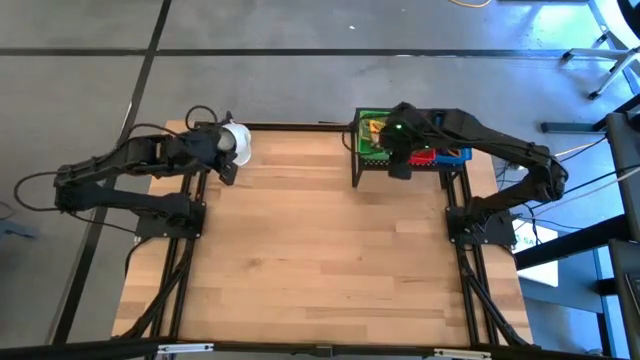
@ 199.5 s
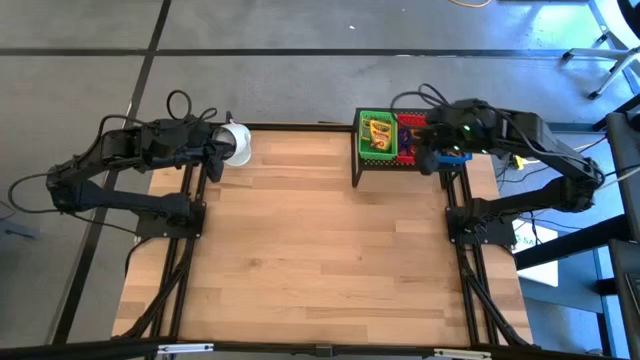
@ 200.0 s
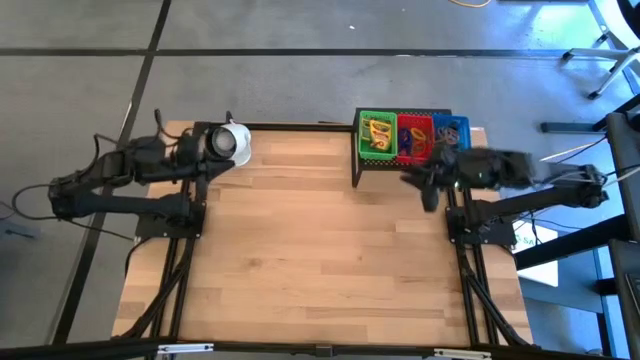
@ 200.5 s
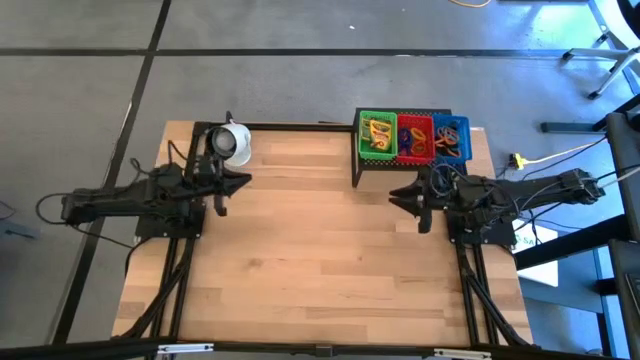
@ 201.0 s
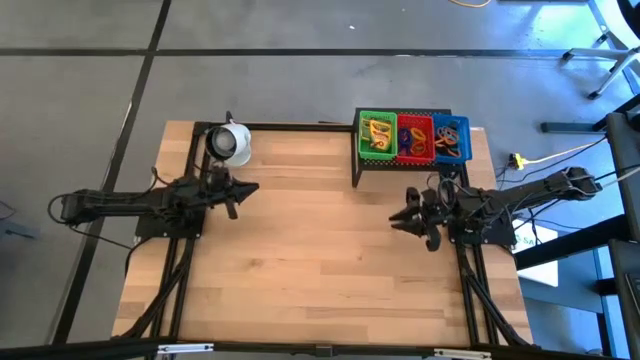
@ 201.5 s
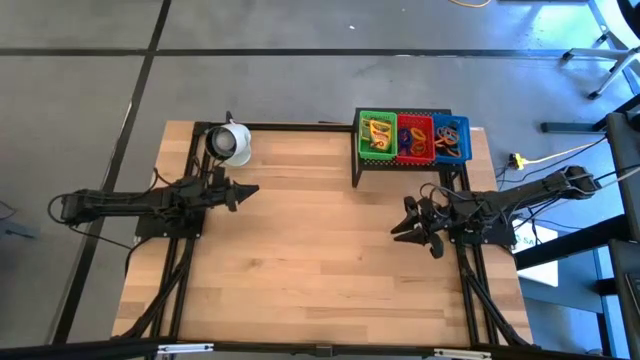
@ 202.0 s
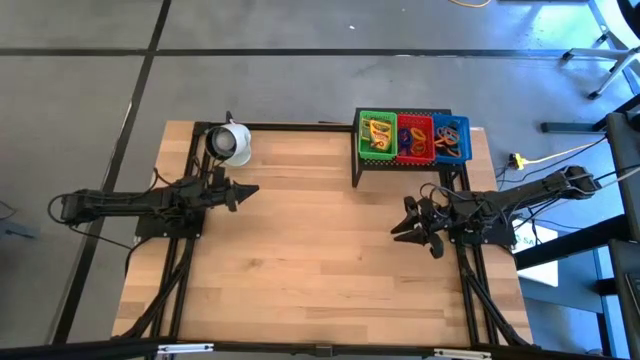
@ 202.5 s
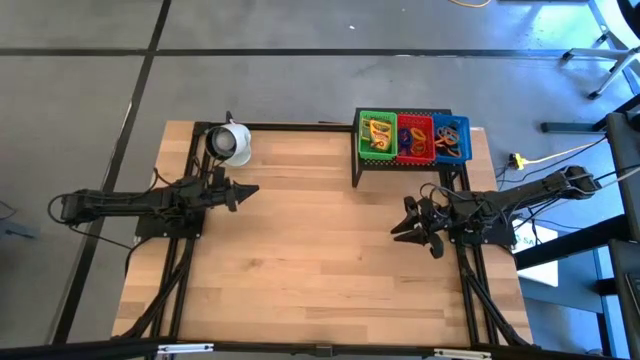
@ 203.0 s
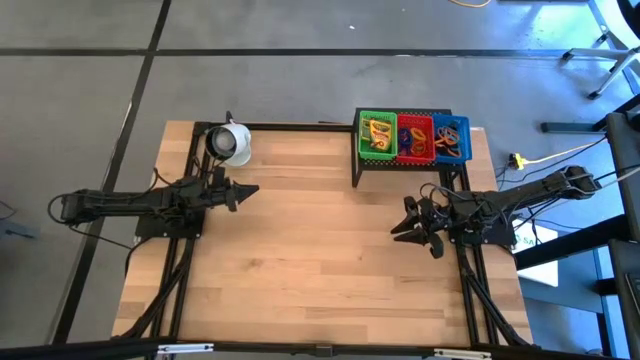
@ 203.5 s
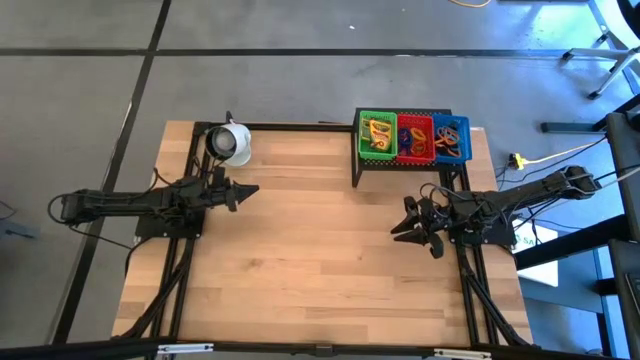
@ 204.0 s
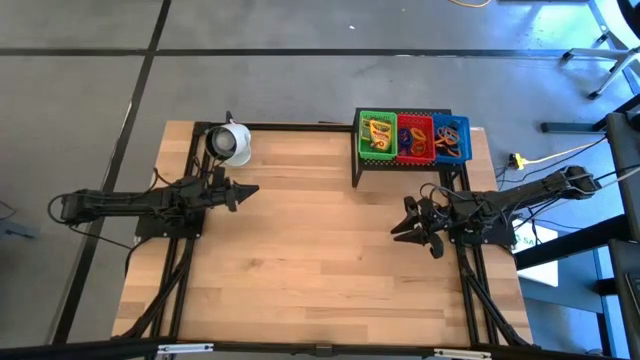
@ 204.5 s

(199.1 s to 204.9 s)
Task: Pick & Place Office Desk Supplies
Return to Home Position

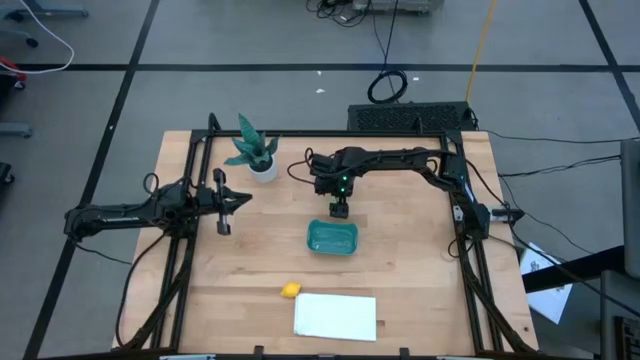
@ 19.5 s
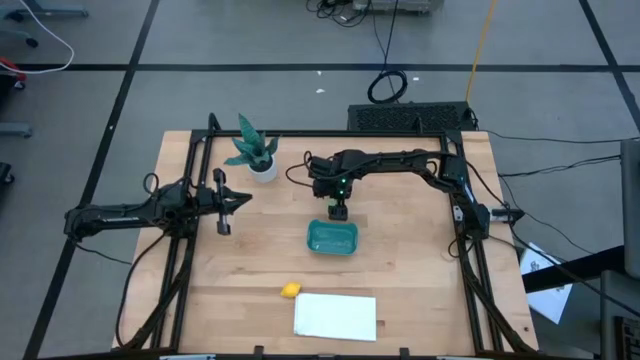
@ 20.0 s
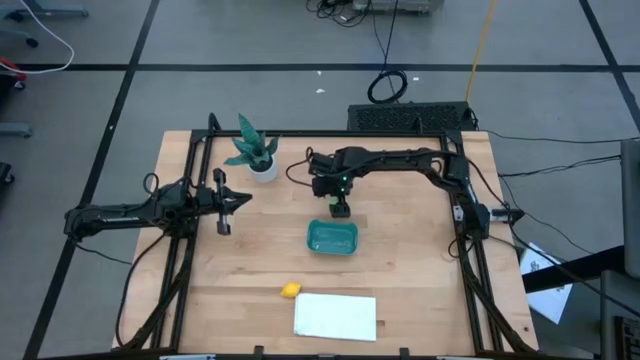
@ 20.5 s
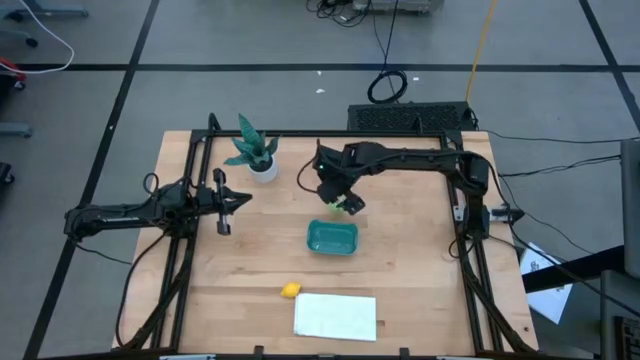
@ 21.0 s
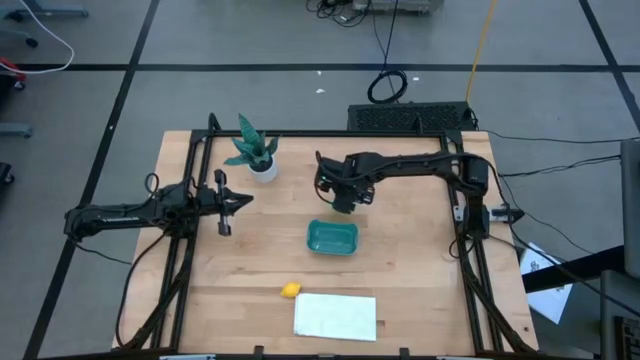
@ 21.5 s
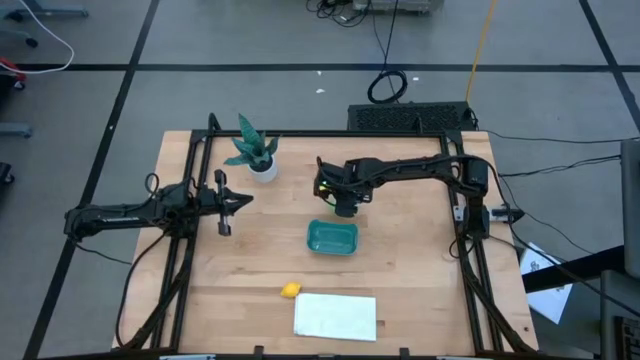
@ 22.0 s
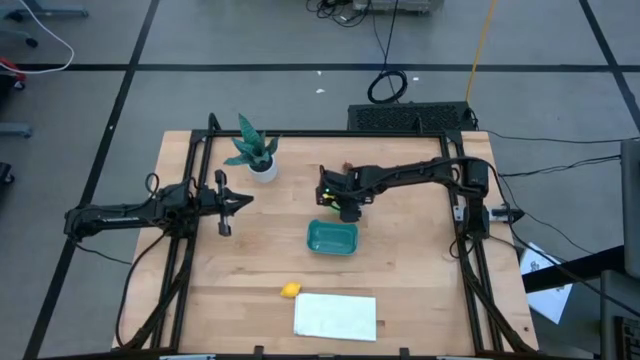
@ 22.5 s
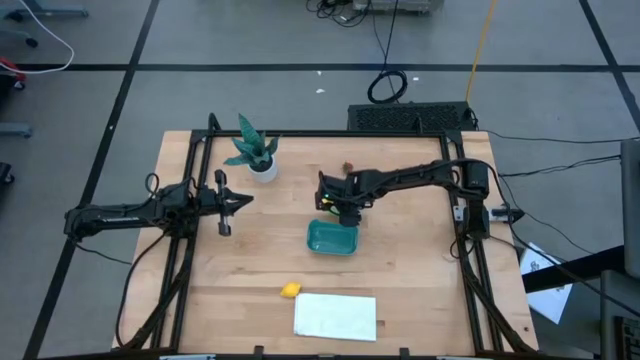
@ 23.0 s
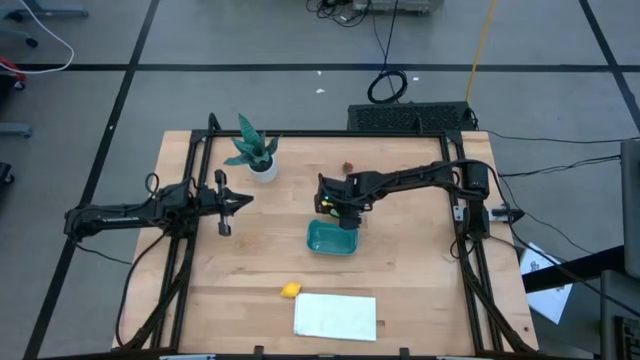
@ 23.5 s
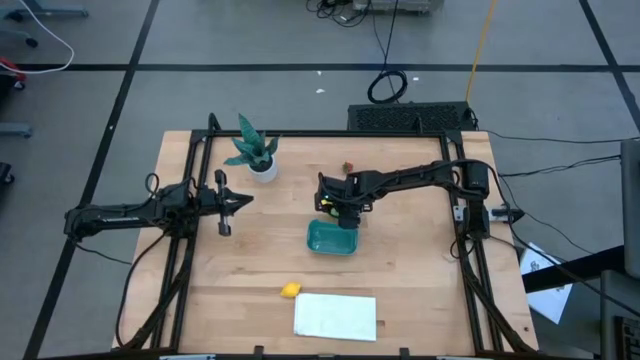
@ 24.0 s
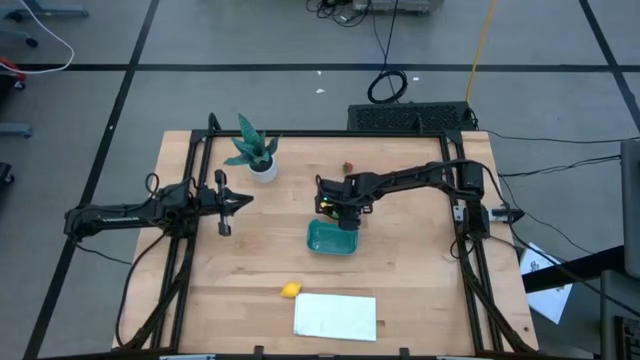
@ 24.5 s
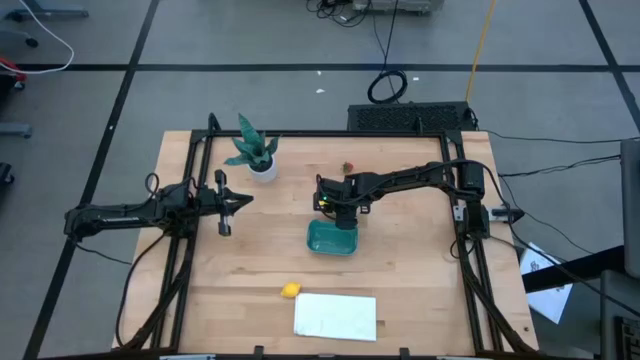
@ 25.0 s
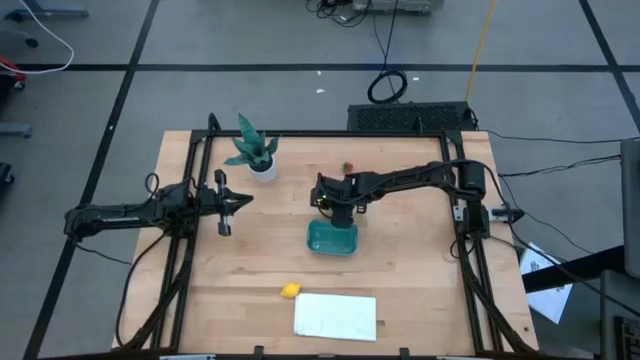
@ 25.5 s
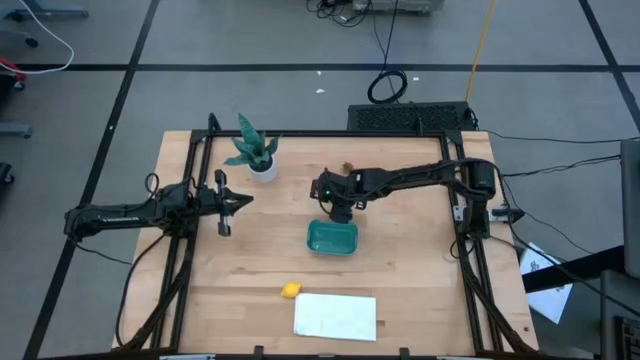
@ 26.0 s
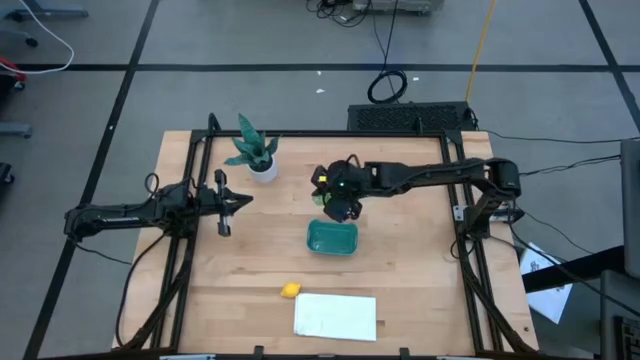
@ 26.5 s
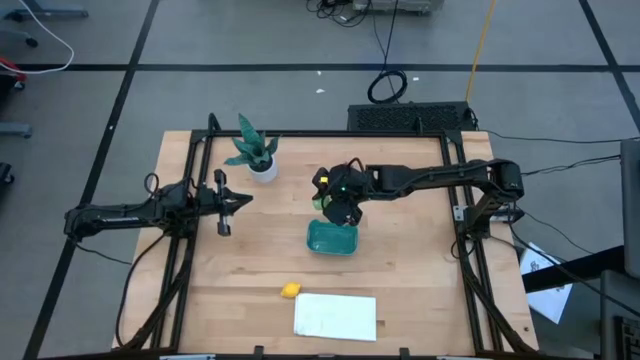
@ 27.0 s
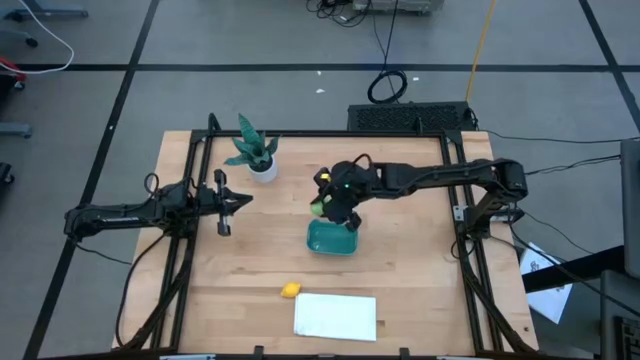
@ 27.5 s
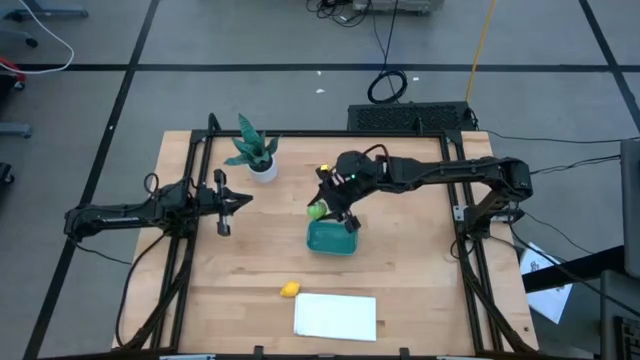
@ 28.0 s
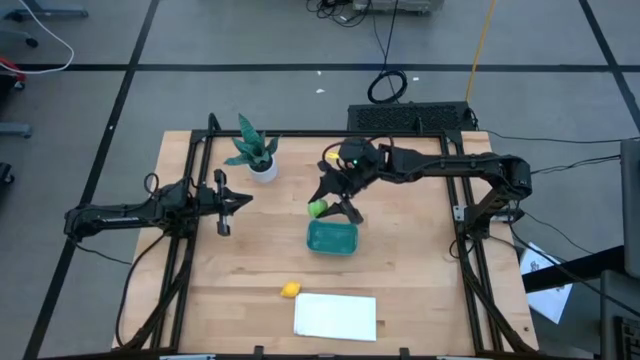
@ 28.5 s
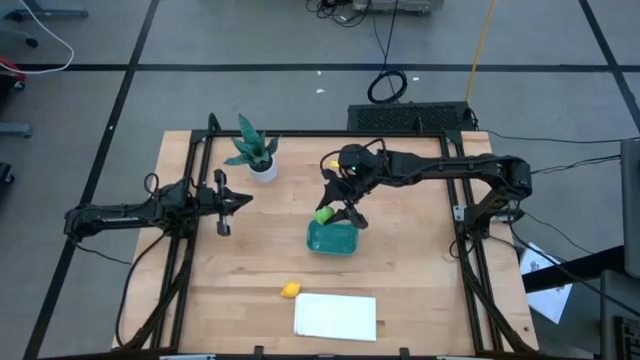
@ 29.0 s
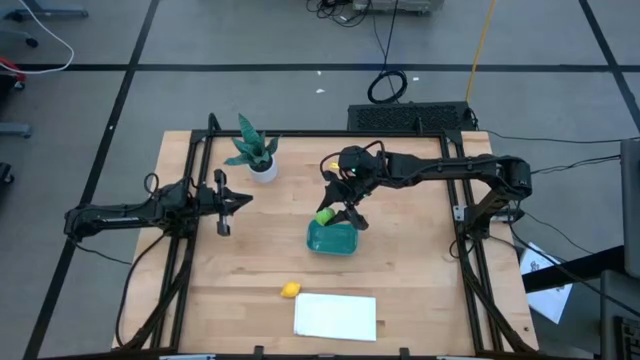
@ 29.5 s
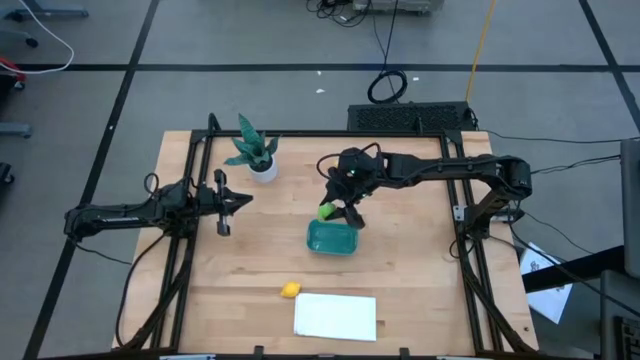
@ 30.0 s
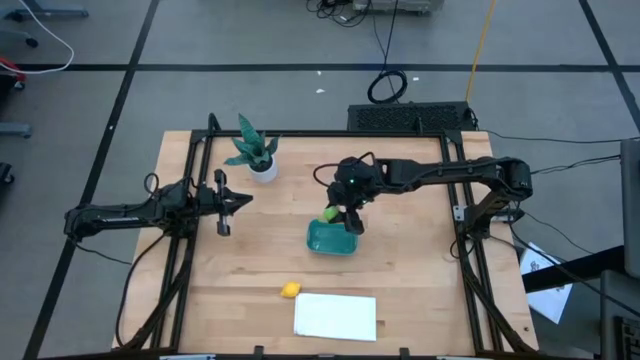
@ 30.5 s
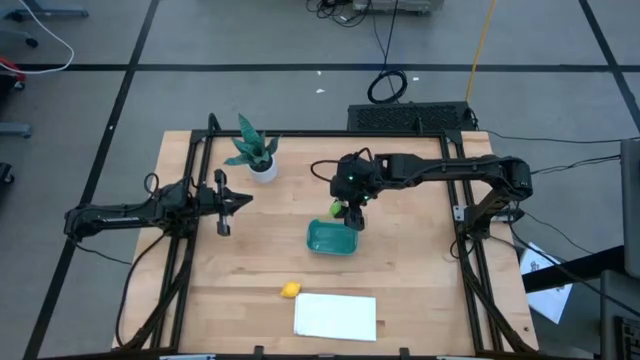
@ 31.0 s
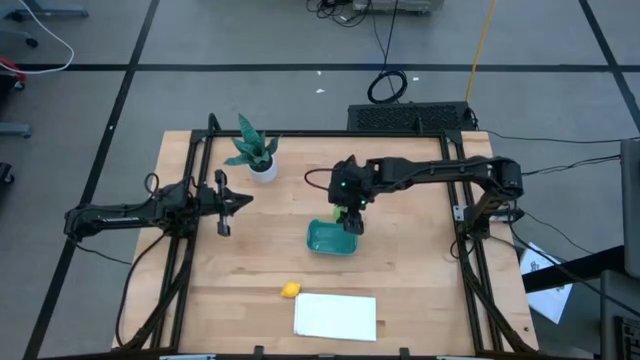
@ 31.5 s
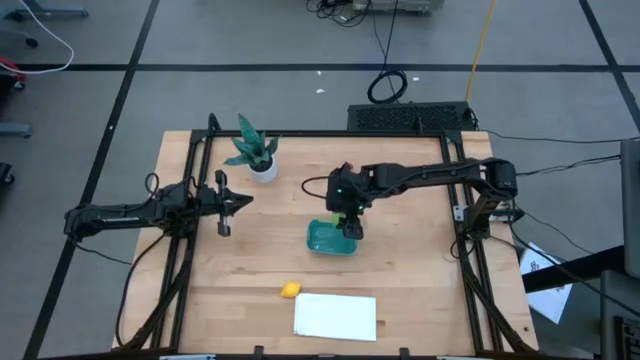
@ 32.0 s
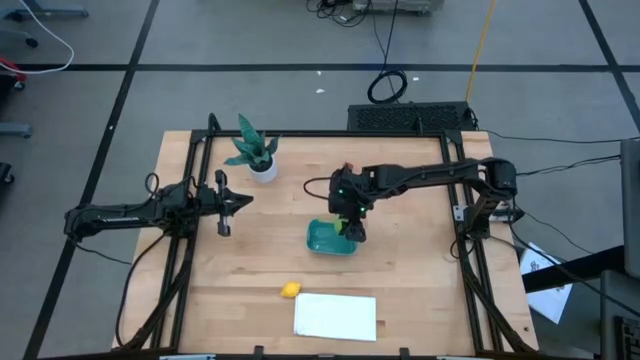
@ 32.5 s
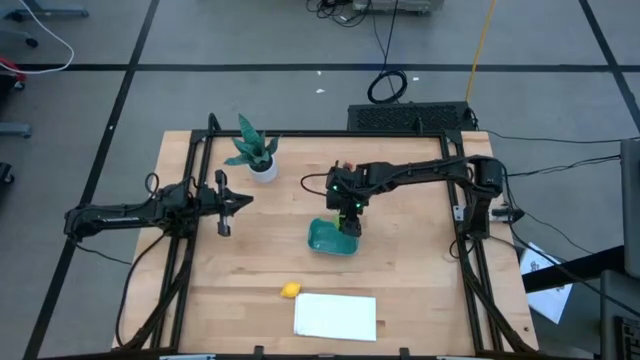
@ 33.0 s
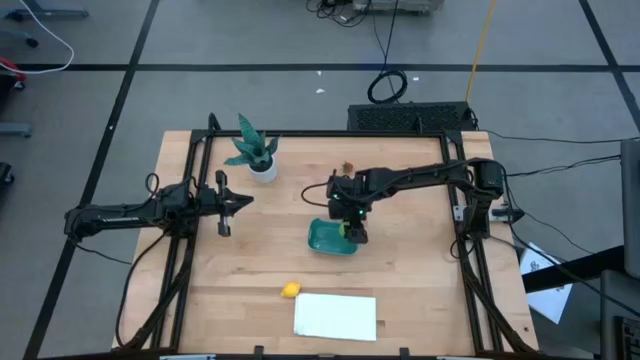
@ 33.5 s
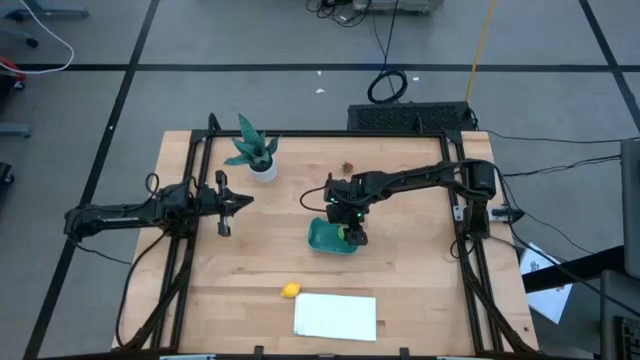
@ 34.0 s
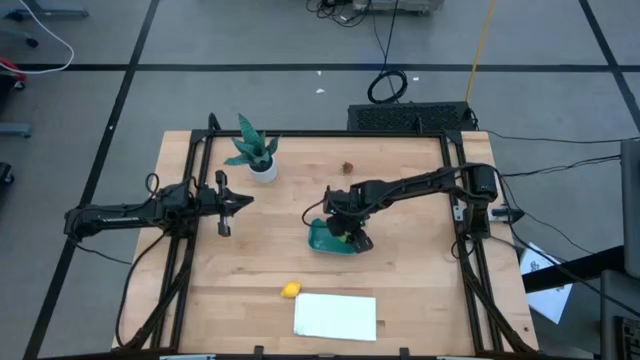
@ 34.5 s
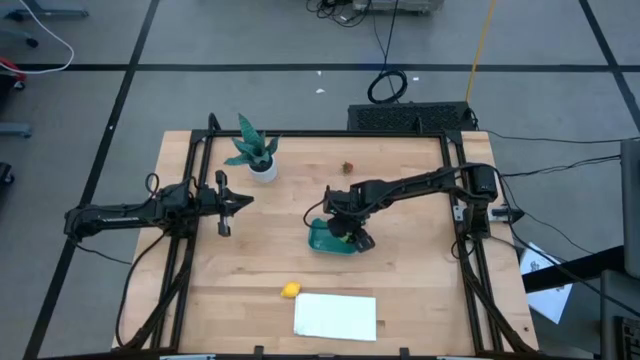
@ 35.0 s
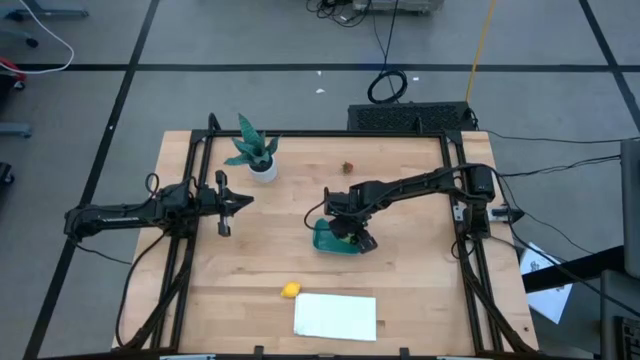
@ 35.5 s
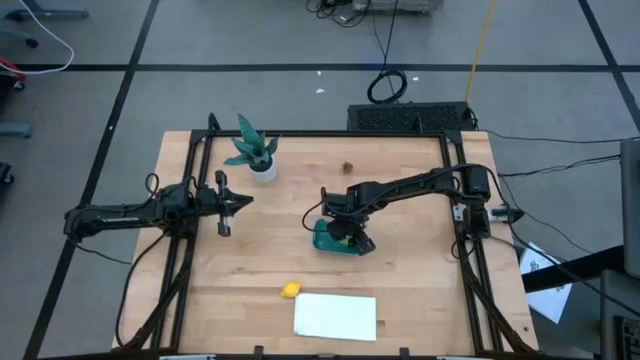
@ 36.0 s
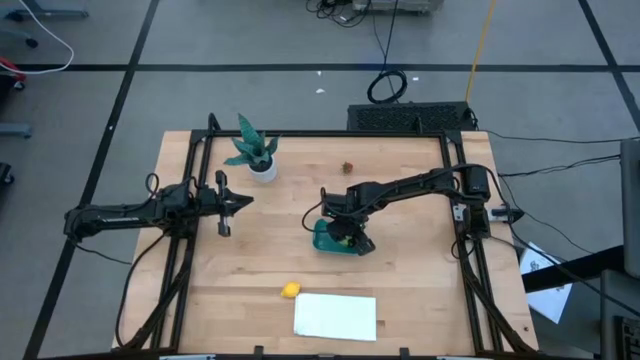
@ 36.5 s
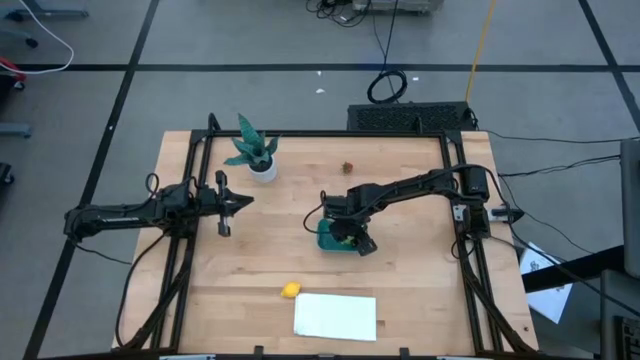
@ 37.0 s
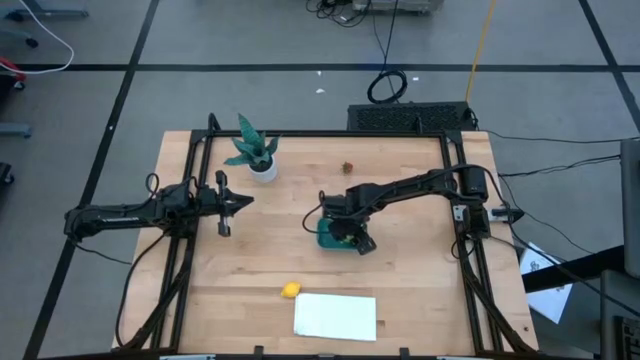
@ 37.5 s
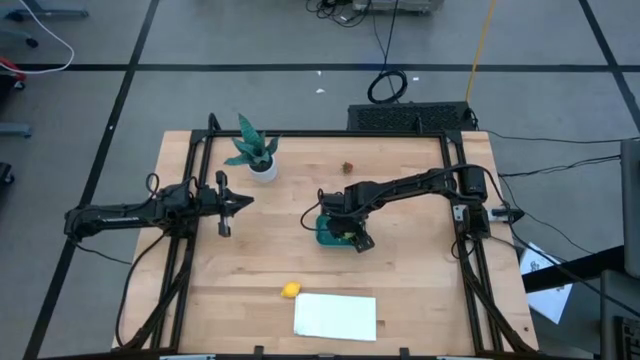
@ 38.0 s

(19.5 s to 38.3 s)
Task: Pick and placing Produce into tupperware
Put the green cabbage into the blue bin
